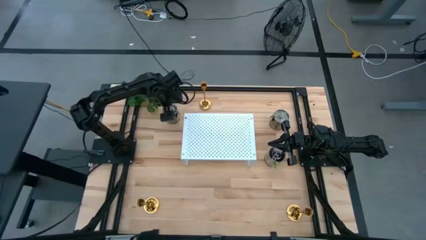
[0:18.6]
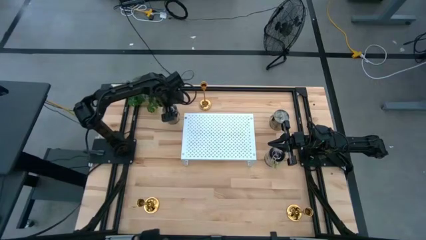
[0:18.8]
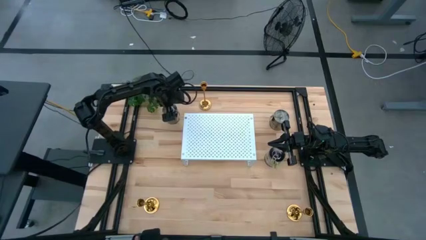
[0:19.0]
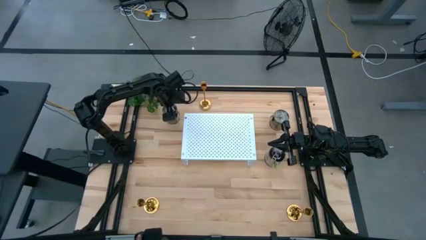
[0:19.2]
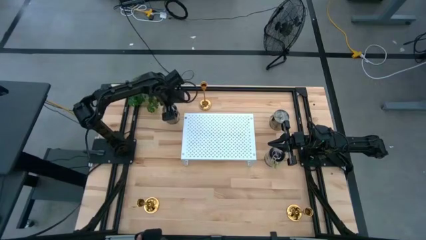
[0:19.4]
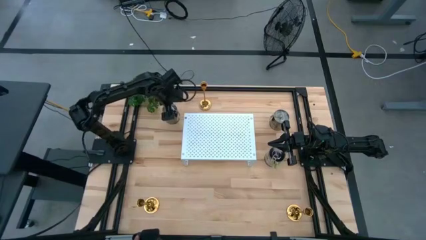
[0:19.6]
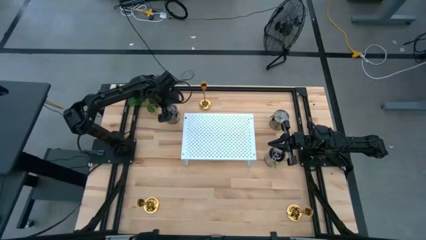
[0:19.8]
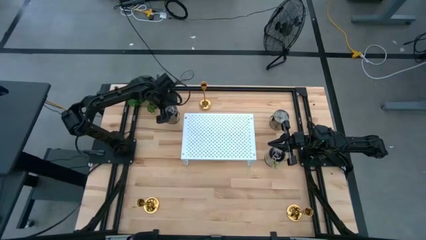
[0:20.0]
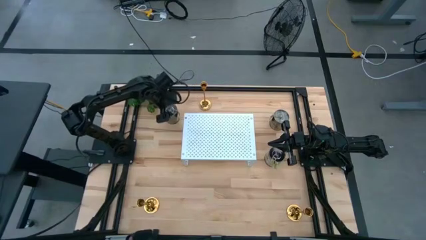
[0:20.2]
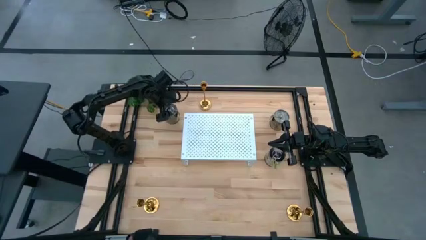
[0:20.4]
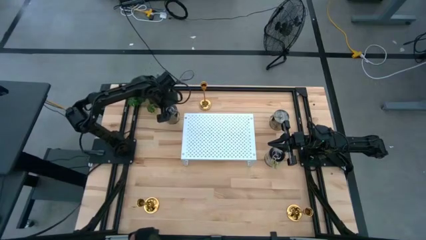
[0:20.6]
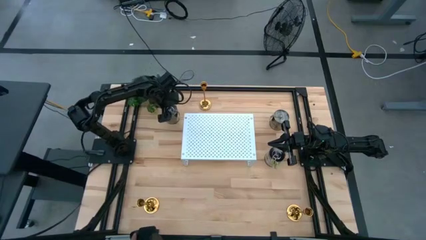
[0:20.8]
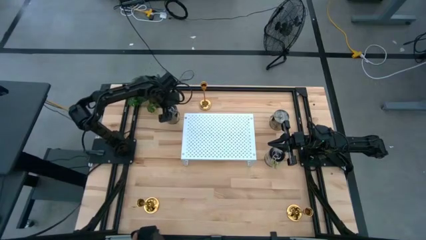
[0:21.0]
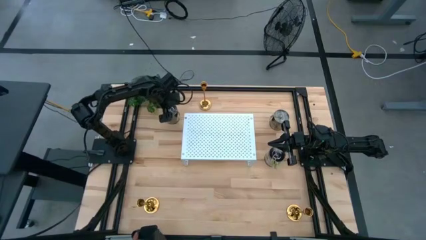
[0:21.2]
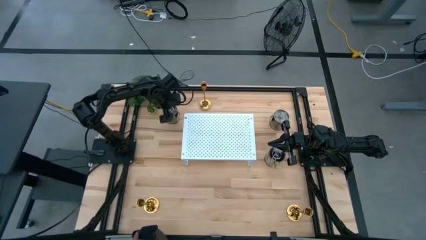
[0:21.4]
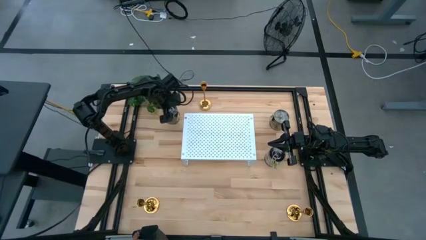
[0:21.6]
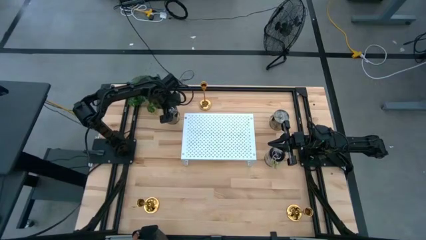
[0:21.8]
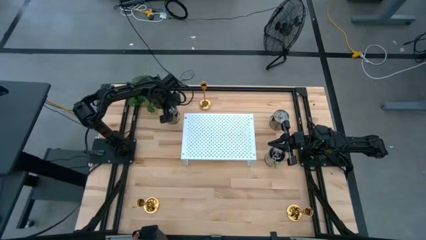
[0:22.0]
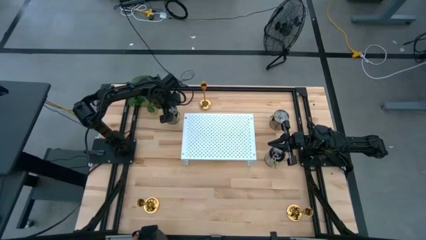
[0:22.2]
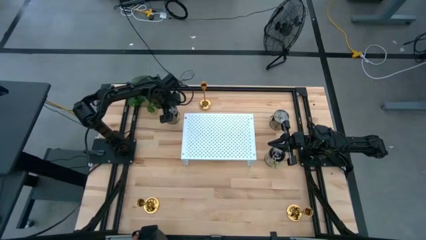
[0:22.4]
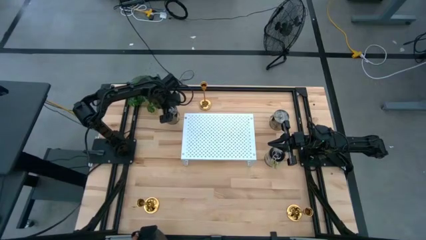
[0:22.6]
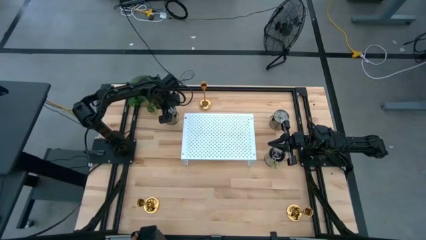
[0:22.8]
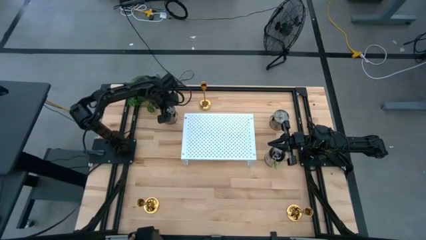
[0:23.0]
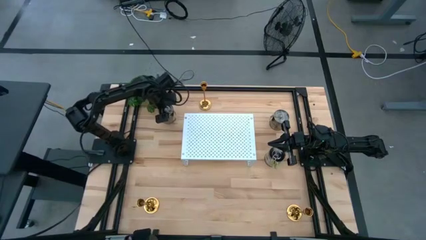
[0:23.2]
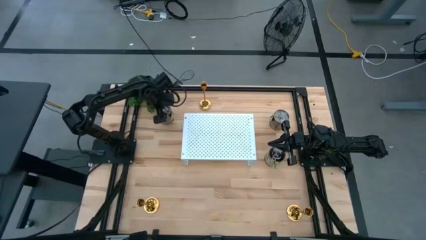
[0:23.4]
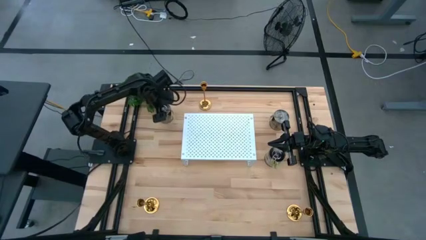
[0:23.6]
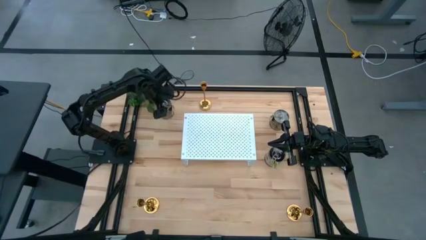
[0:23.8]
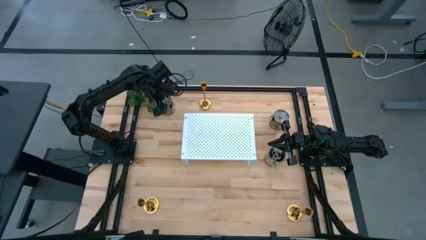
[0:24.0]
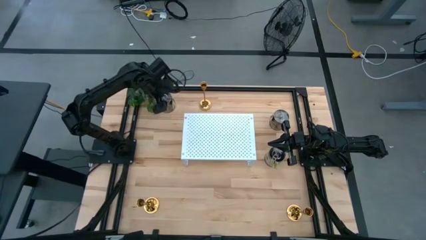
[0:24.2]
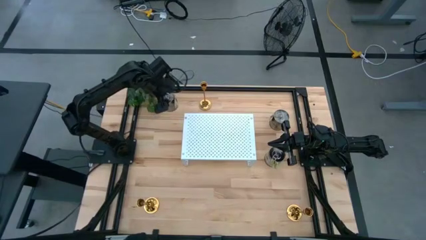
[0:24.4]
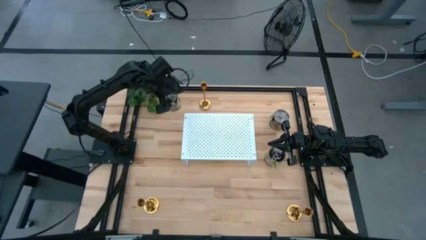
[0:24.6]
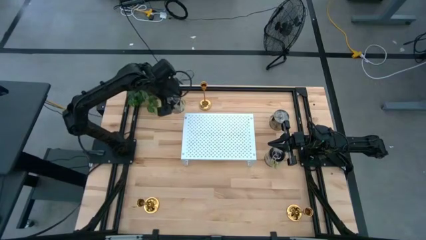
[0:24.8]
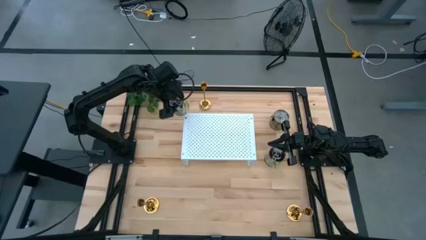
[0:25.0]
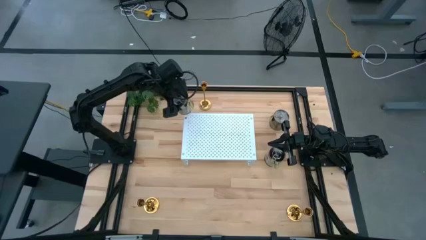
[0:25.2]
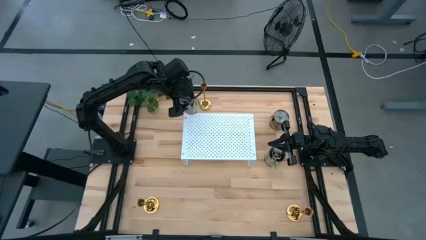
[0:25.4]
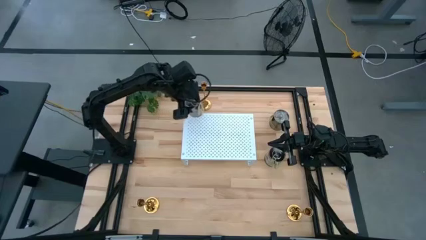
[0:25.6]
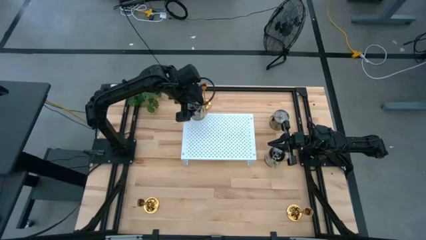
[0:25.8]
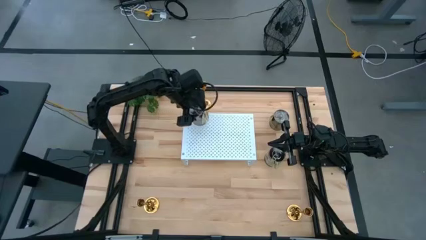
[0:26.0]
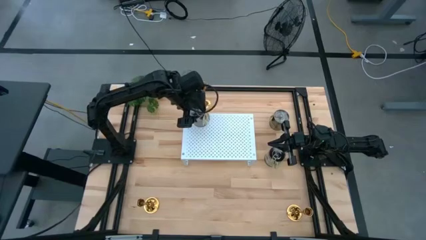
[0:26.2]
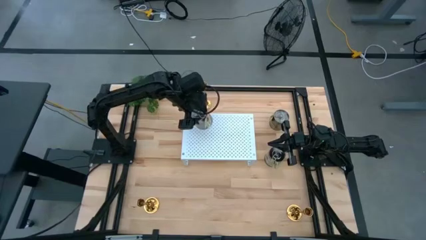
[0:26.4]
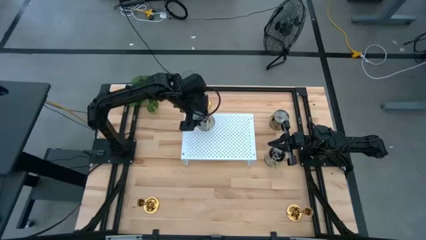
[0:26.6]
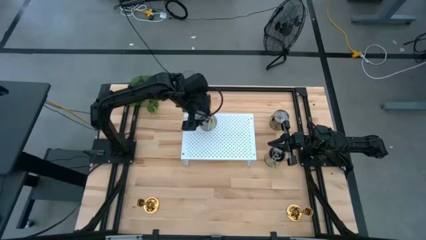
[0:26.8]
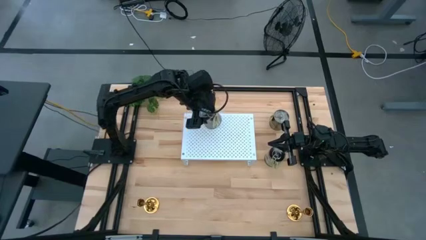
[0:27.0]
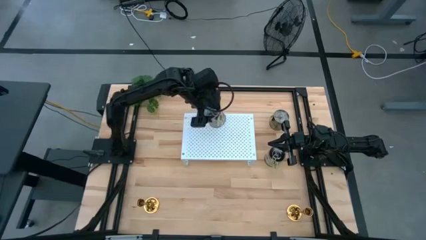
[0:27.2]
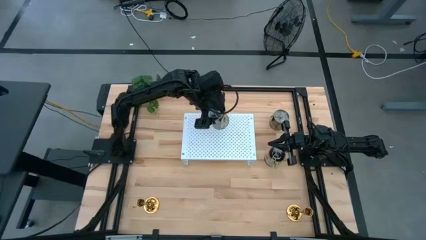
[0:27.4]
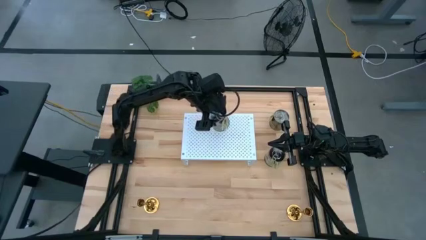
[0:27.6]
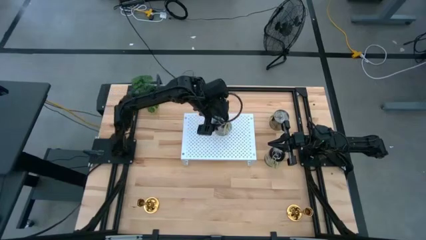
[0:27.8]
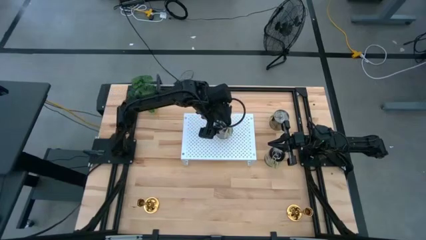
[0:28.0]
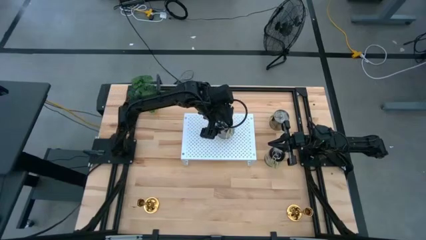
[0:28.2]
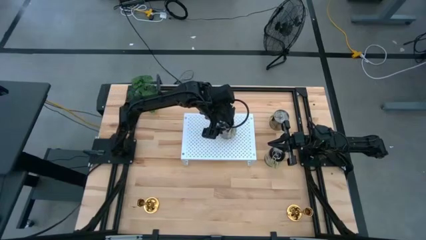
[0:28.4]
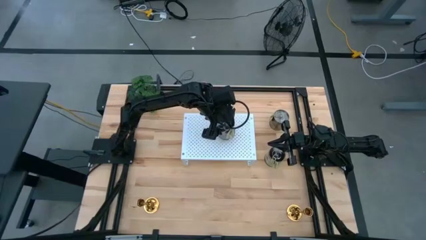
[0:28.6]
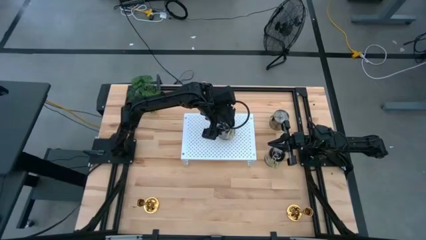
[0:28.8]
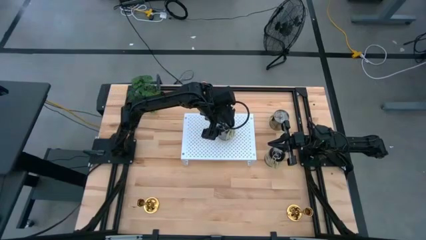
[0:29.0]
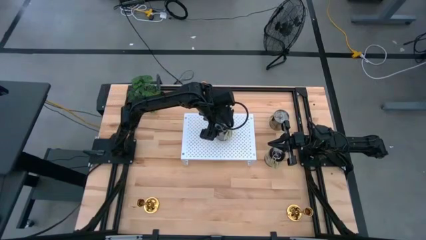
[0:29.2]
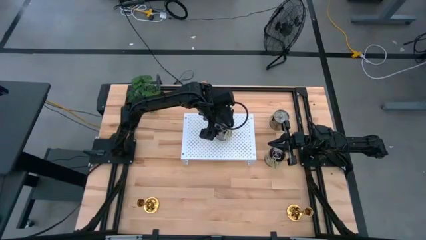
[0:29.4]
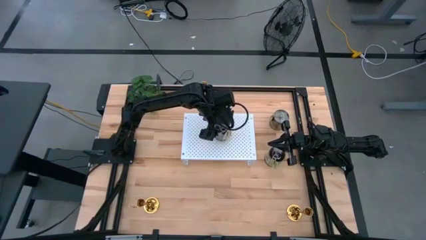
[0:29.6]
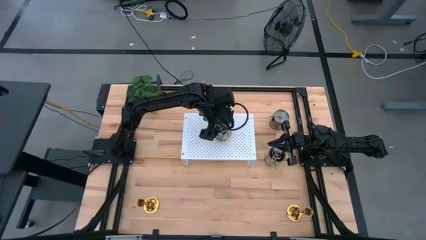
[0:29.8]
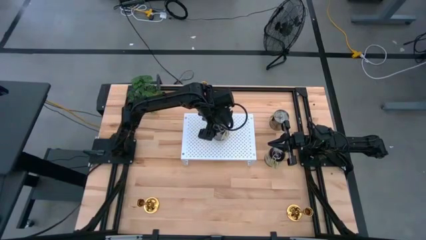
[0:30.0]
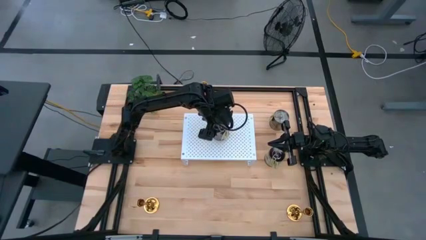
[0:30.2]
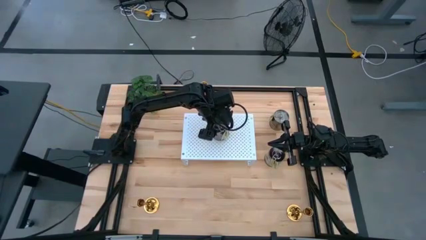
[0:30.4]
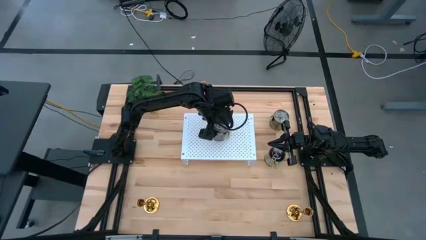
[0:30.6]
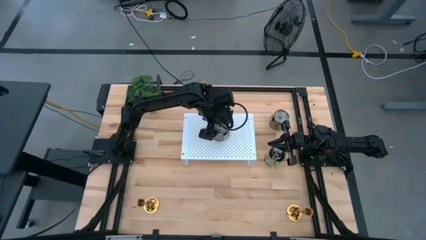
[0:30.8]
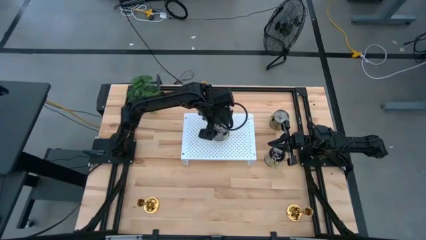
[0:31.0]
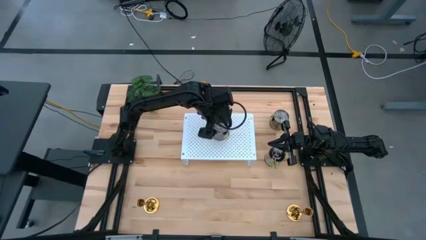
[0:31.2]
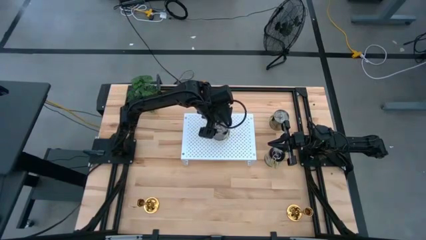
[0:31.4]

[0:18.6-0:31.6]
Task: Pick & Place candle stick holders
Put the left metal lid scented candle on the shelf

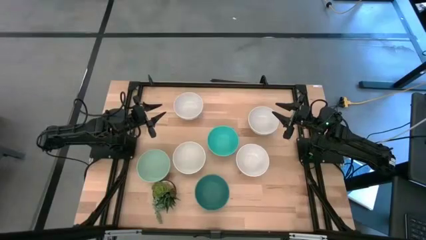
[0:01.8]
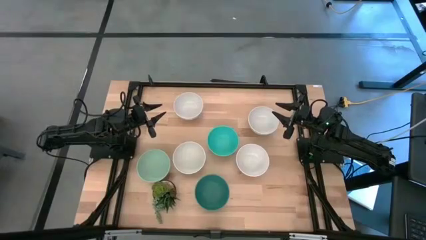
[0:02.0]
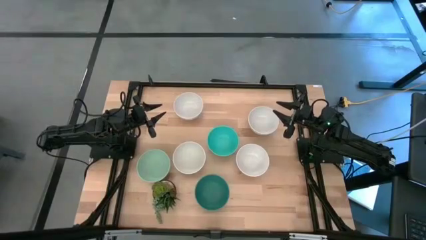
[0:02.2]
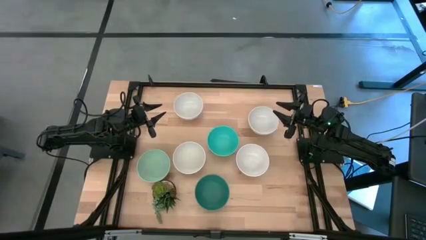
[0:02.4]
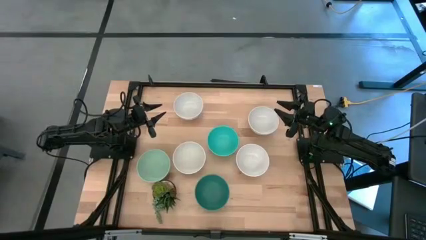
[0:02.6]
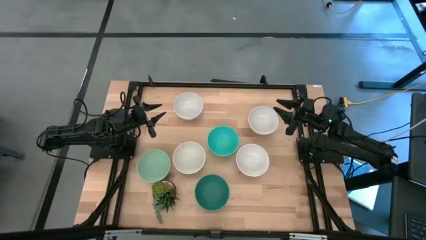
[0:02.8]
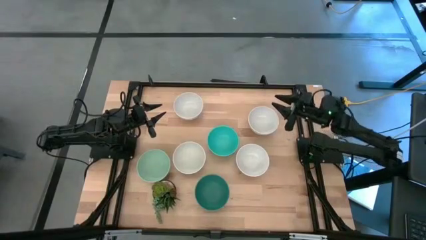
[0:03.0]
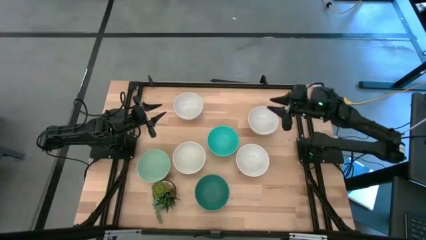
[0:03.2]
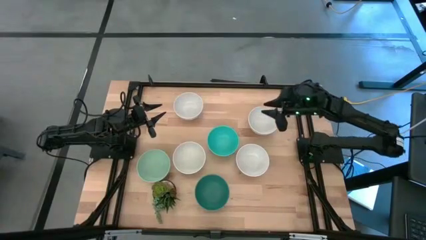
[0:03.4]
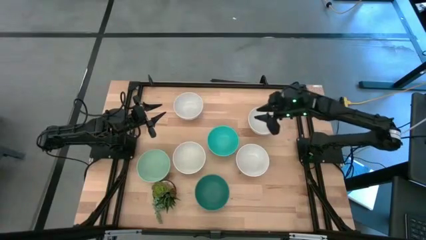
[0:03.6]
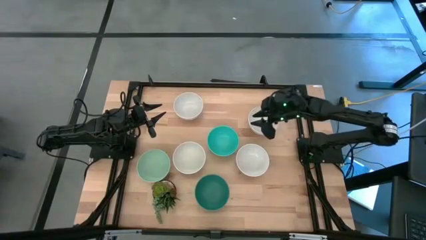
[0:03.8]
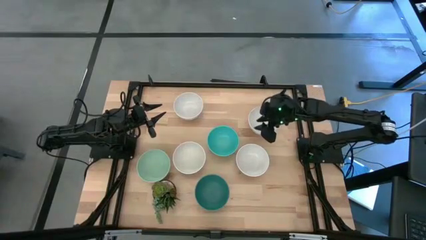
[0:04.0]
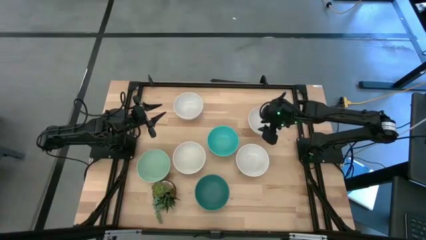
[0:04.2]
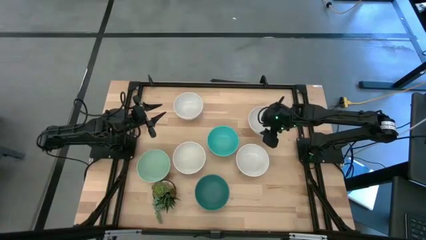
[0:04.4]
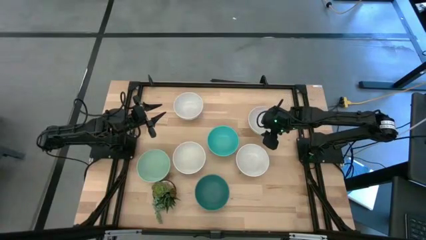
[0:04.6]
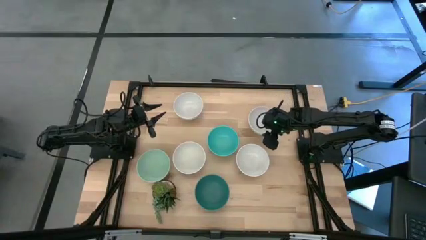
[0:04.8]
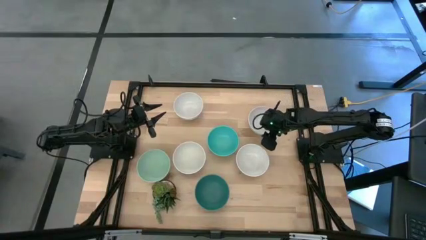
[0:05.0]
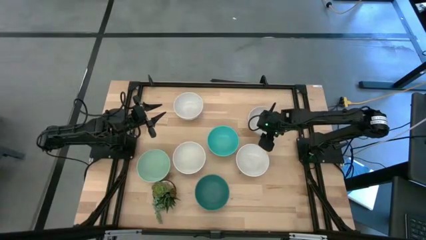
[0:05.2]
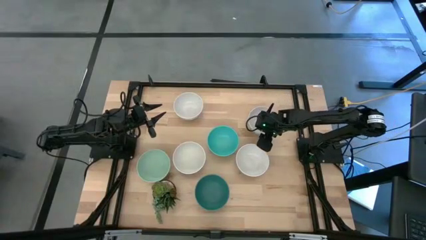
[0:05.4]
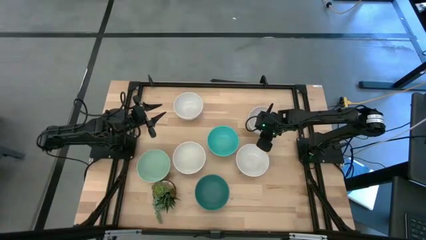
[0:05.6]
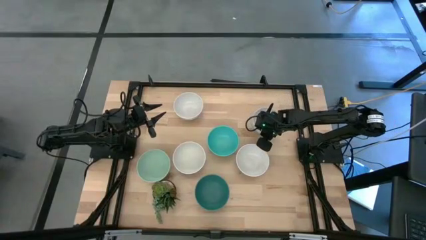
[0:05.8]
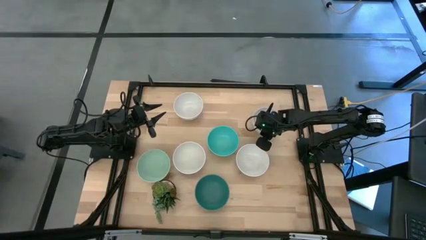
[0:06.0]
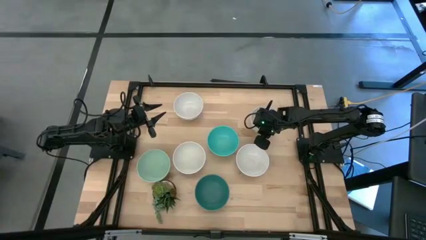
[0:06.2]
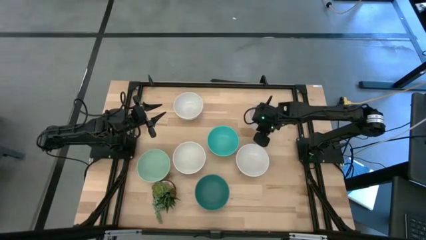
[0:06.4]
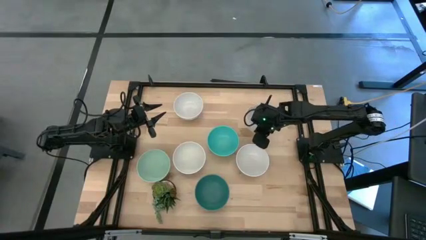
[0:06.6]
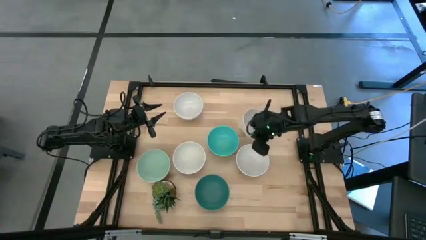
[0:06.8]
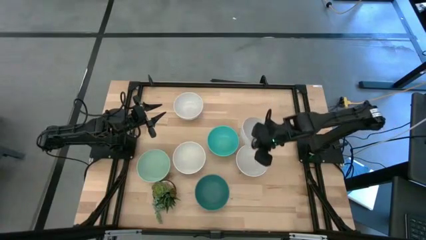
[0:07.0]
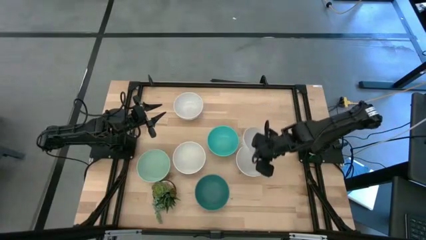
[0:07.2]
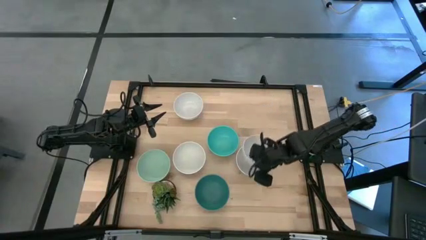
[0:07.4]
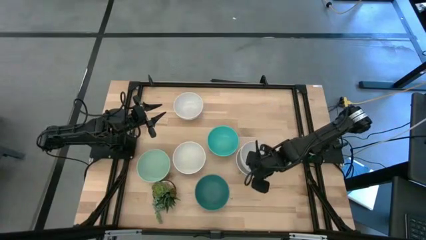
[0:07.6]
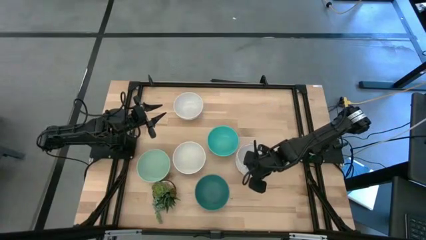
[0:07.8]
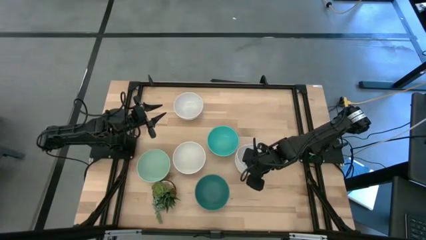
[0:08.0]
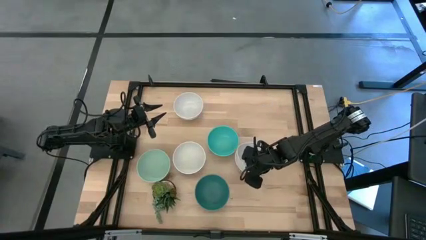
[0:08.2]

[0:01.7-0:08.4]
Task: Nest bowls inside each other
Stack the top right white bowl on the bottom right white bowl
